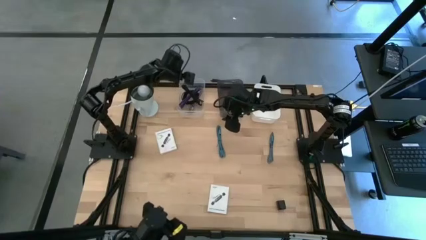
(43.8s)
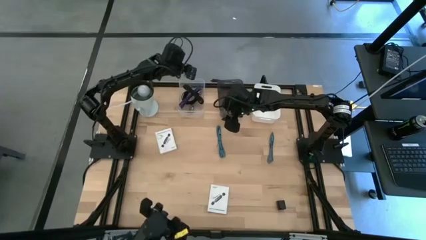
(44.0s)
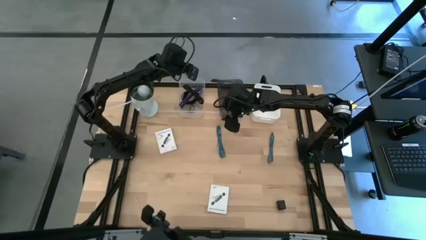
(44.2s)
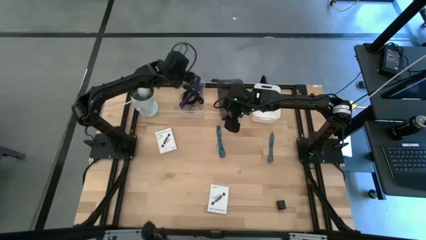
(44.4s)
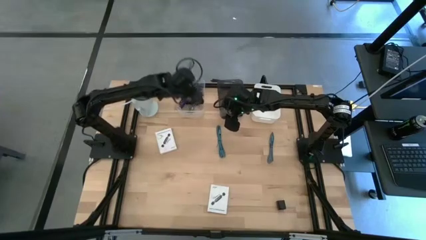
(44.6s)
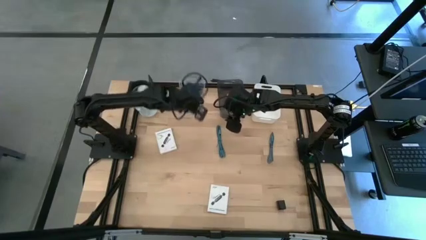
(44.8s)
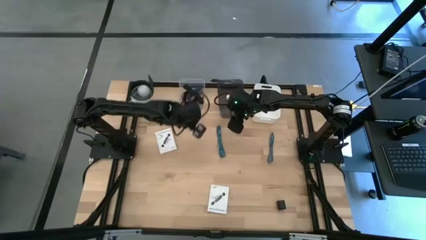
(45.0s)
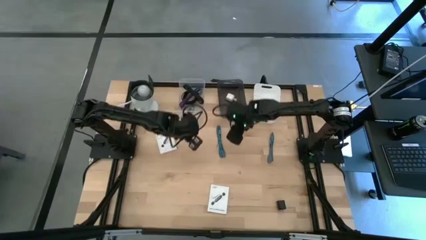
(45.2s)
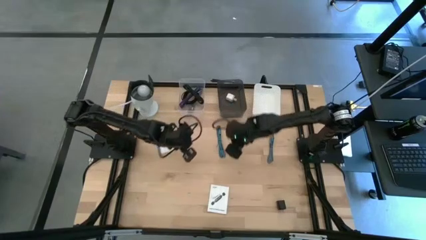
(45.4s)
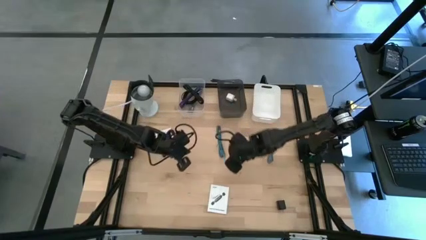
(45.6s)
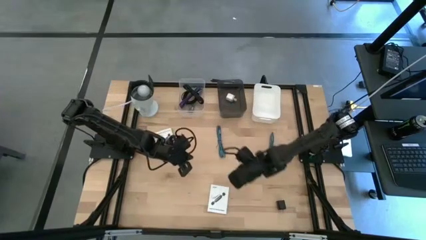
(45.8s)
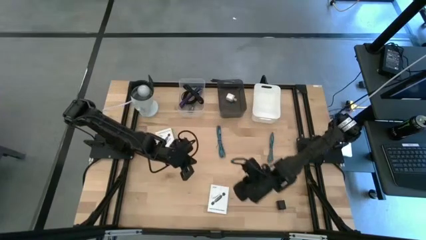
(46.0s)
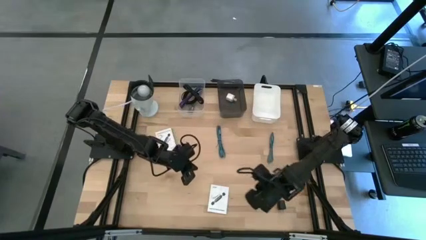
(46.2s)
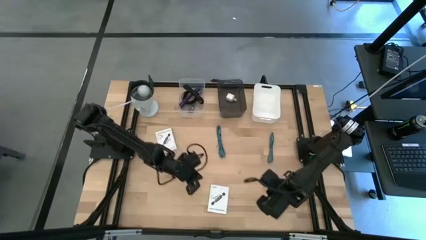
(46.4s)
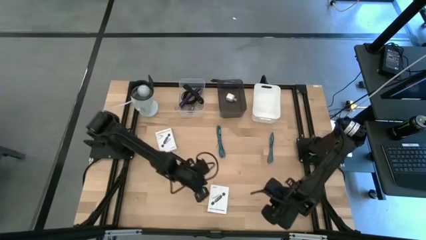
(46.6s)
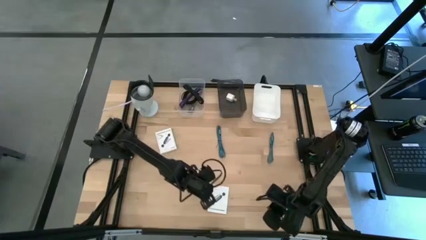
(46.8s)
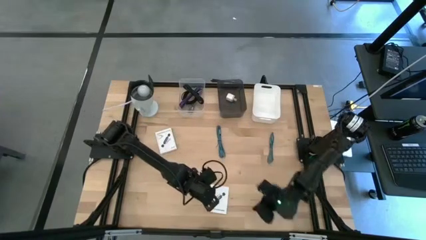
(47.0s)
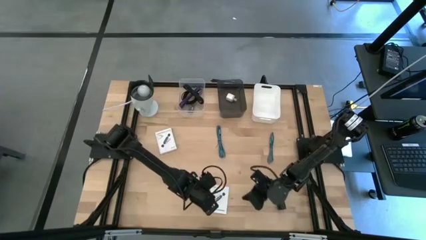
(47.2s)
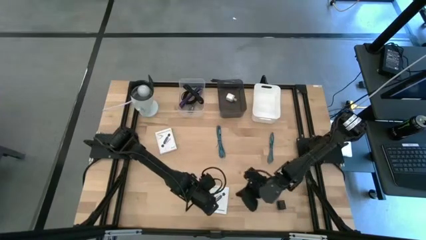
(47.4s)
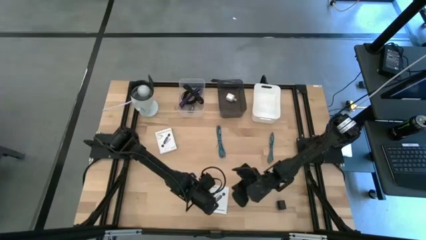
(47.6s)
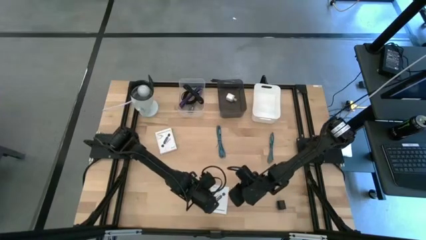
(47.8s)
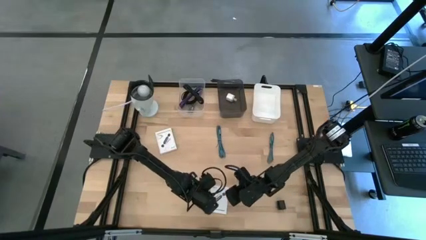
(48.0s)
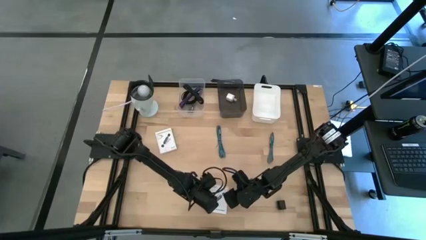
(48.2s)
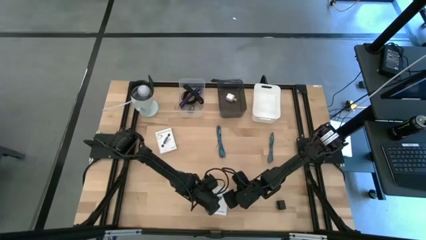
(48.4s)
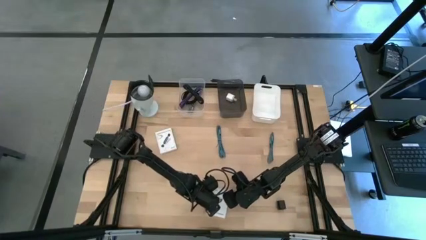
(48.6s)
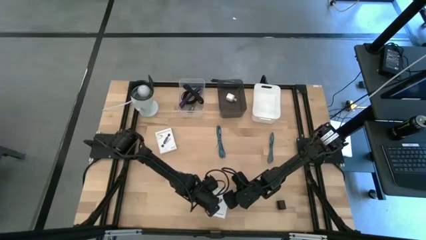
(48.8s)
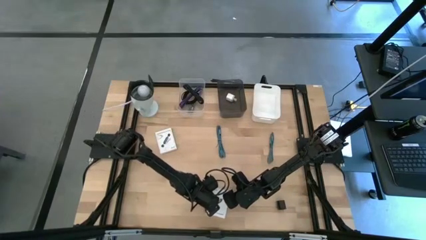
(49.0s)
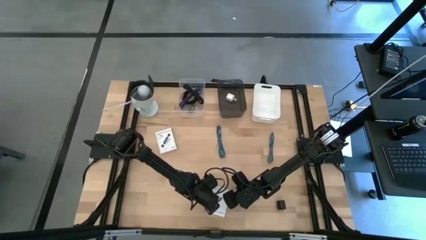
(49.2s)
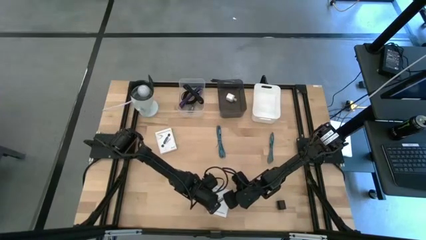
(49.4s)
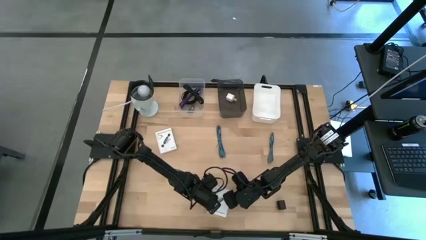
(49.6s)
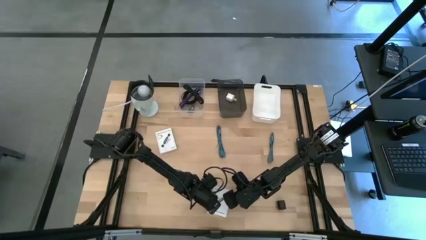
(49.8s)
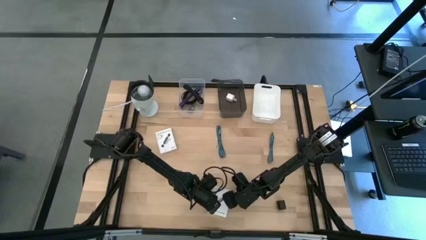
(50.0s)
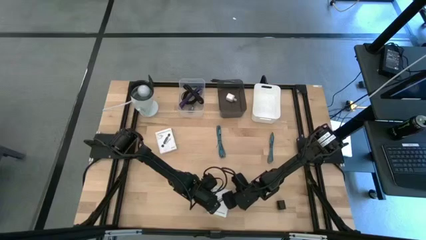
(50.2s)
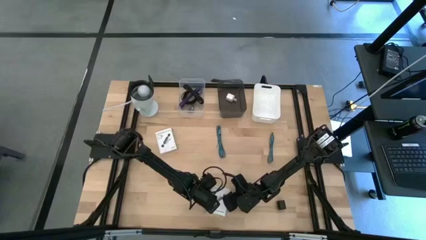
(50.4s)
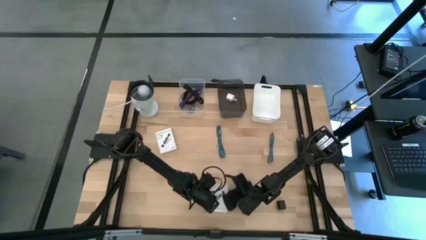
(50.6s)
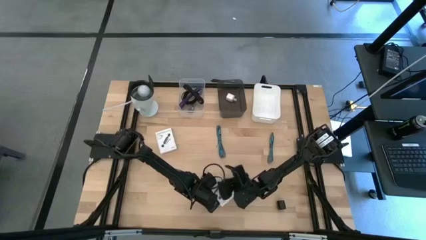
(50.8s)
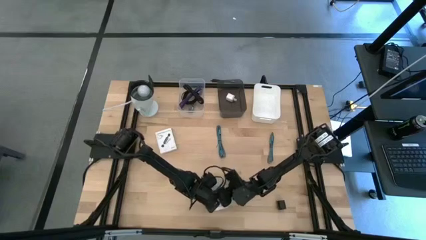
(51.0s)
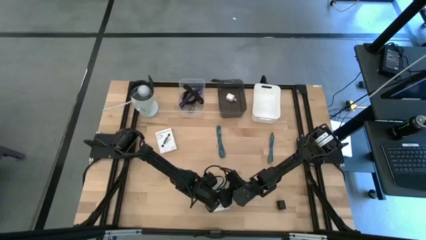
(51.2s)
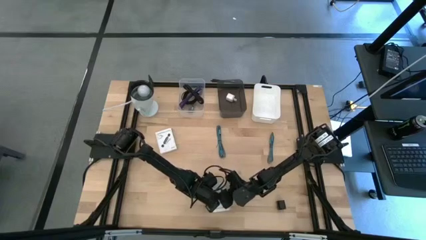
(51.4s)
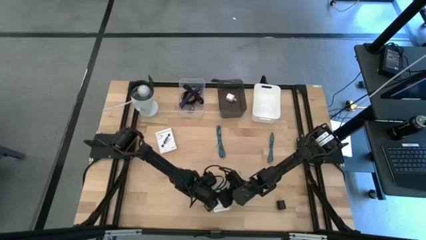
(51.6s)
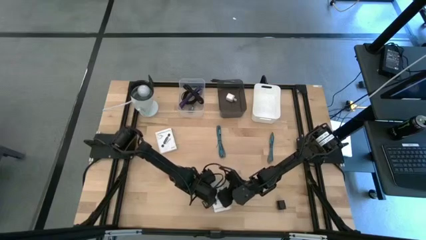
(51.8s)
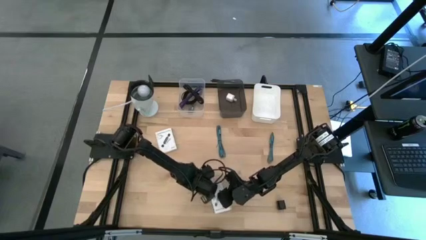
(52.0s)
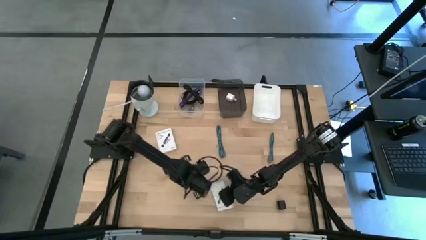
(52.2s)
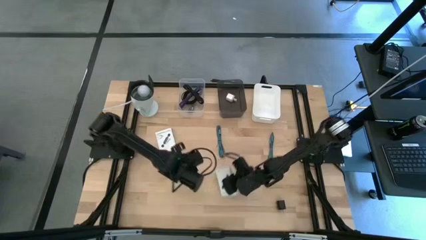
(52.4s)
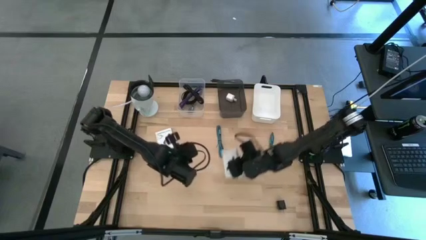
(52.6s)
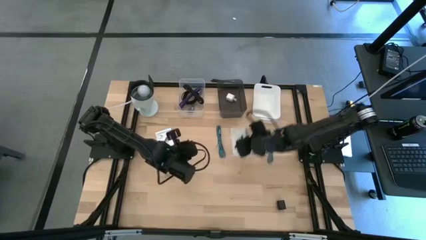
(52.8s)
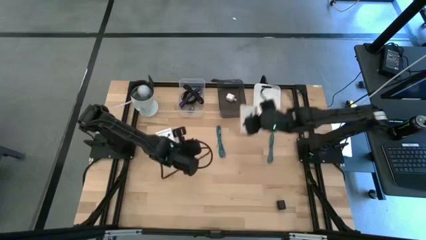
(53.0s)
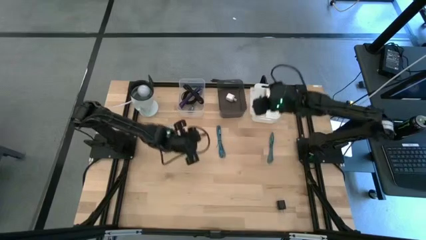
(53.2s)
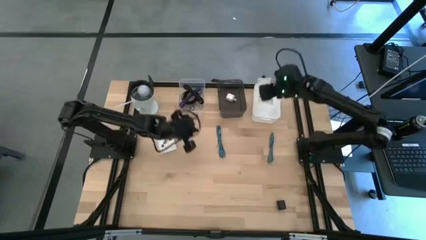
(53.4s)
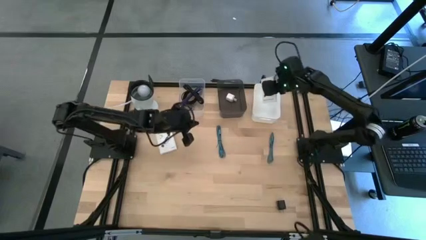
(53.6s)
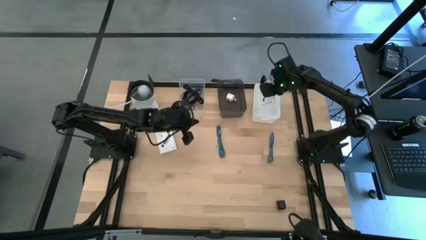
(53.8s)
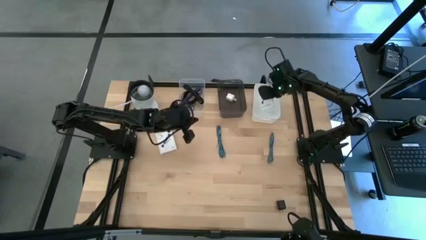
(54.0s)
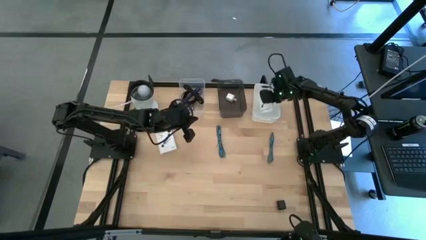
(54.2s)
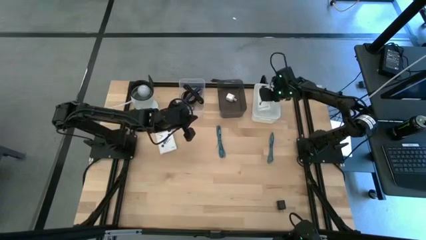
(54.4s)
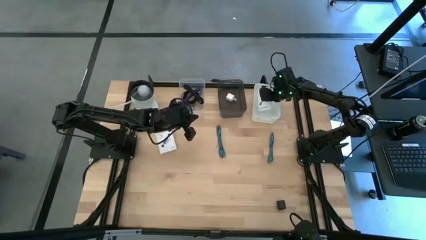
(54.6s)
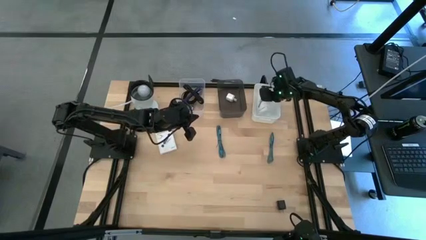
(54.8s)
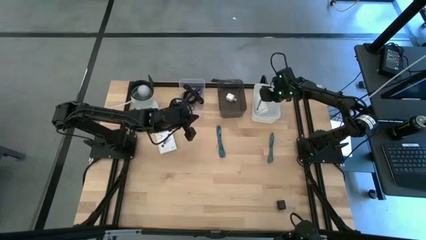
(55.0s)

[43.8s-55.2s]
Task: Pick and place items into bin
Put the bottom white card reader box into the white bin

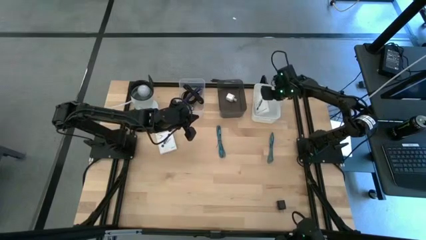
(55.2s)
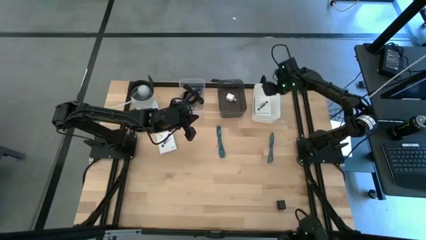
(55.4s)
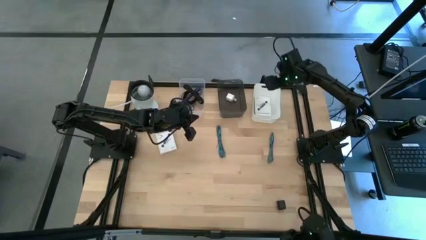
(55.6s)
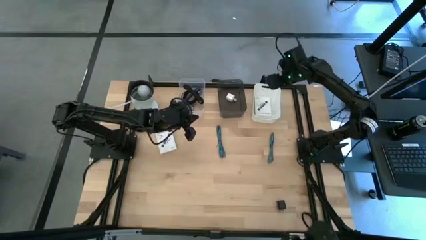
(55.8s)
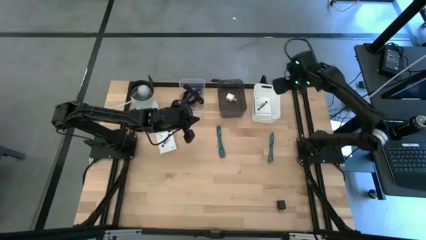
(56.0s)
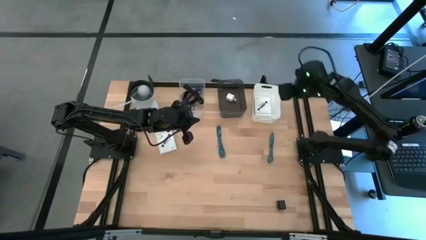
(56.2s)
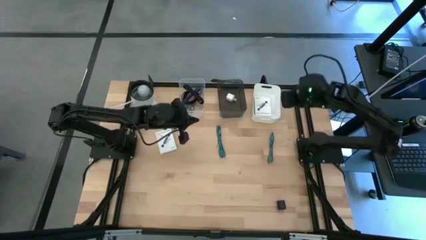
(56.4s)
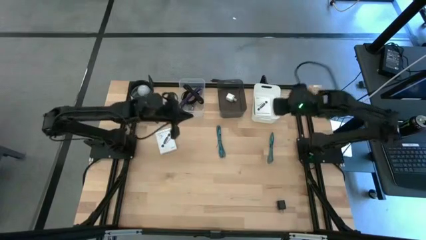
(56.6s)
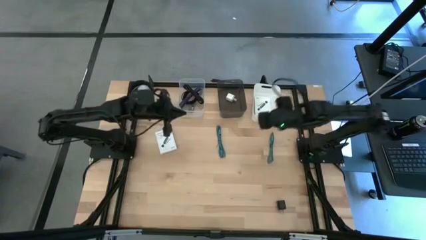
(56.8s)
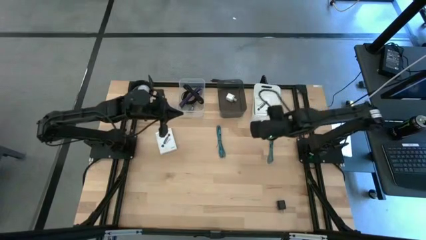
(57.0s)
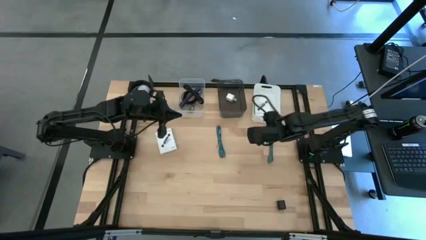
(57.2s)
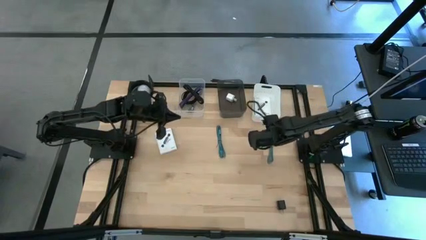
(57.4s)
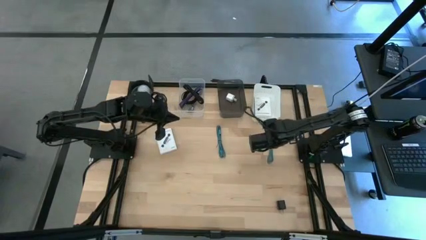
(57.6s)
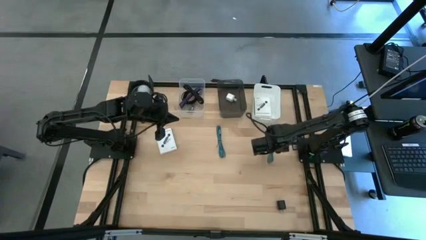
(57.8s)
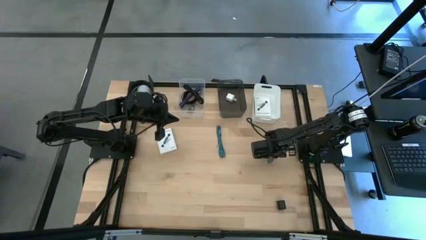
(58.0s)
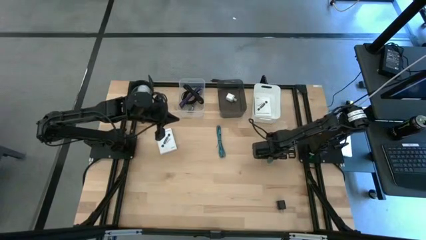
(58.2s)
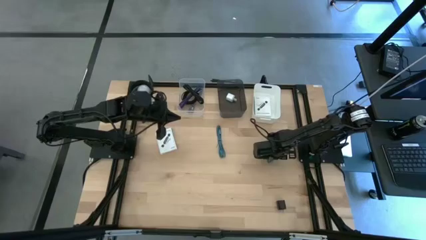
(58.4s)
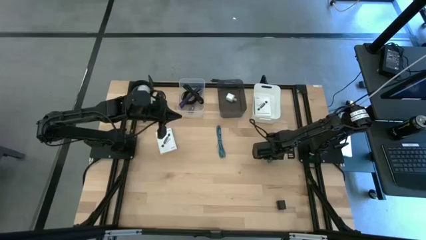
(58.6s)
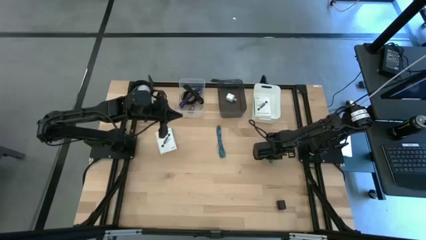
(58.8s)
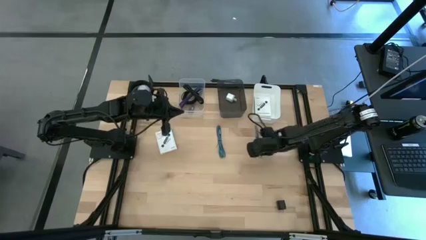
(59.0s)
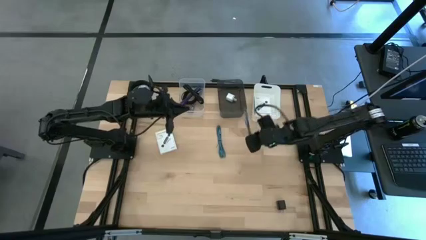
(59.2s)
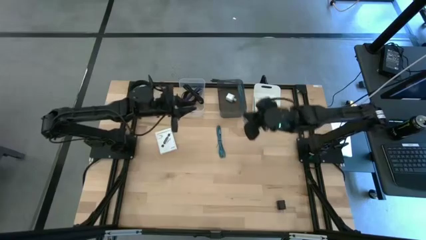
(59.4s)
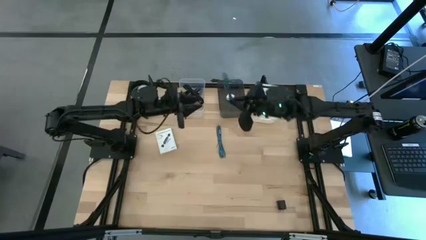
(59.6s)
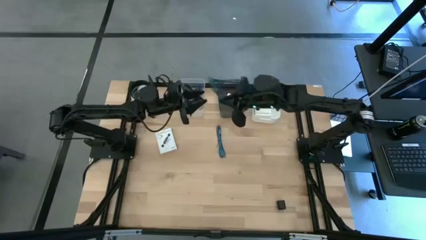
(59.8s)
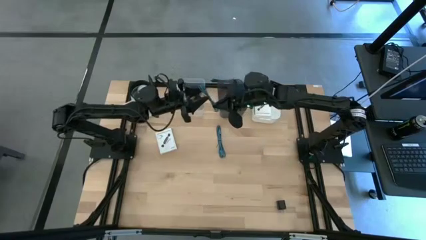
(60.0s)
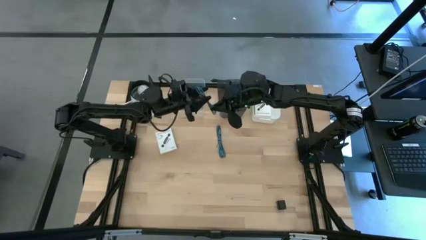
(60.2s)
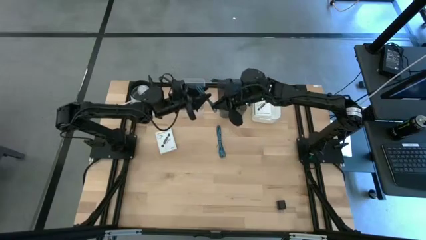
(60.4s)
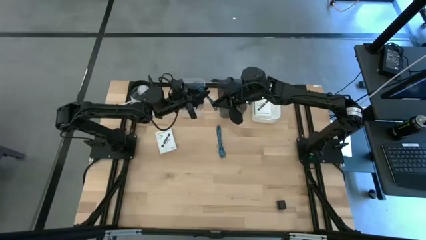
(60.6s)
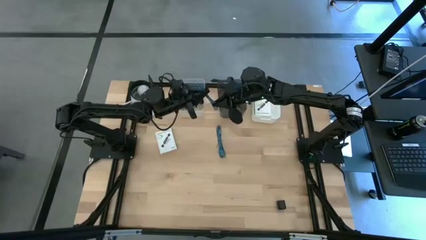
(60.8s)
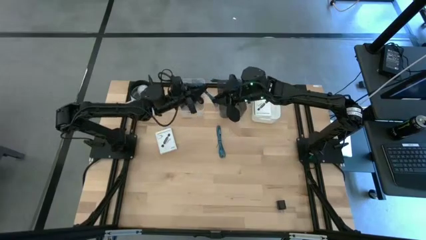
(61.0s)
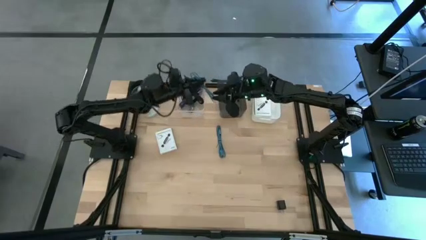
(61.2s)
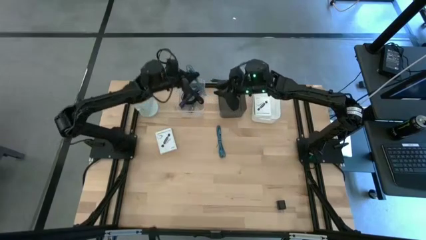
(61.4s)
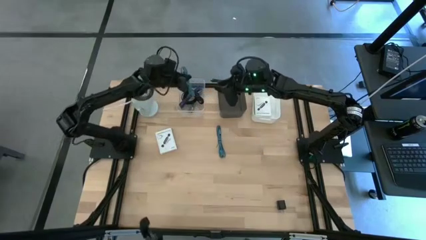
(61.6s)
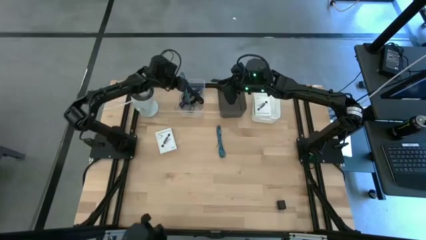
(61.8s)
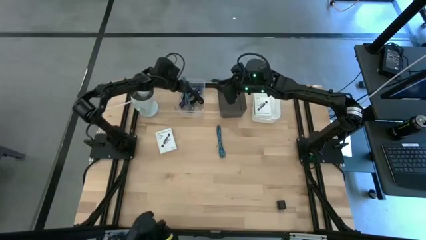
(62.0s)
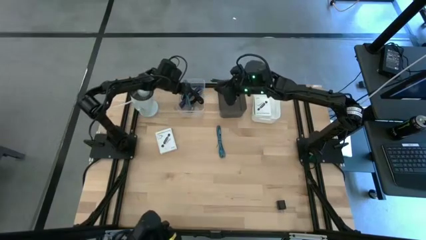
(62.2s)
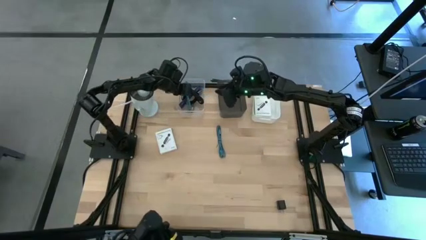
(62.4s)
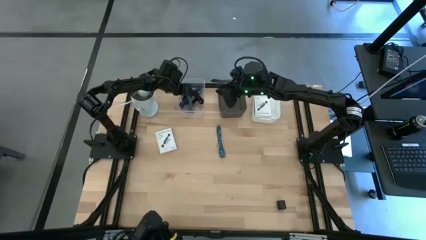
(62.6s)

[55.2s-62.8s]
Put the right light blue charger cable into the transparent bin
